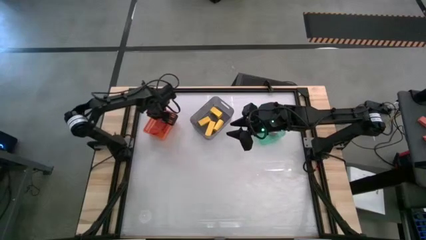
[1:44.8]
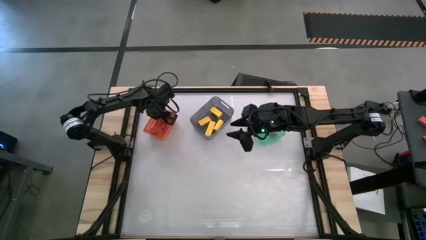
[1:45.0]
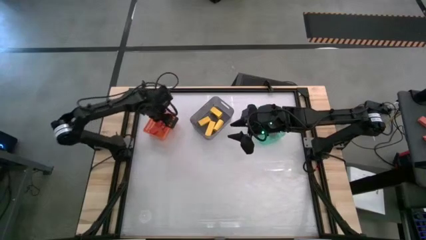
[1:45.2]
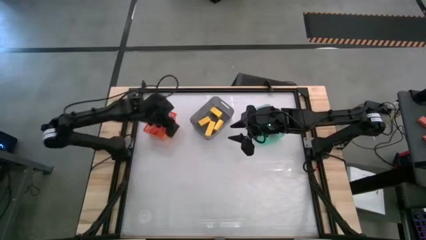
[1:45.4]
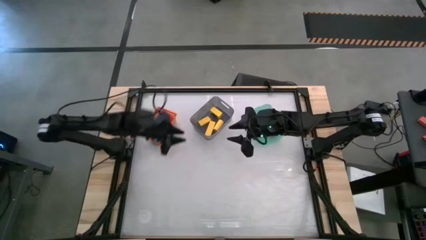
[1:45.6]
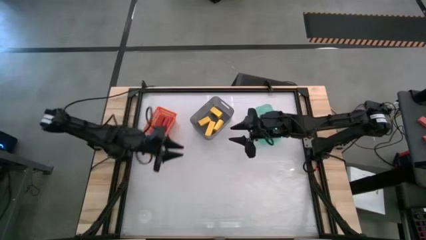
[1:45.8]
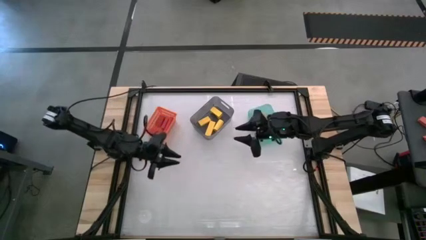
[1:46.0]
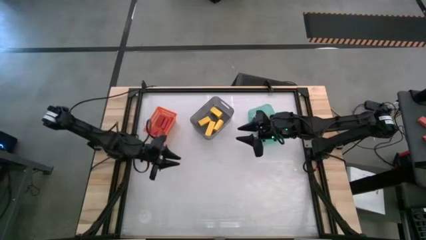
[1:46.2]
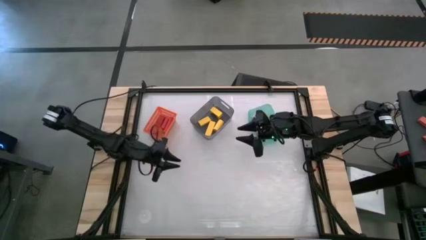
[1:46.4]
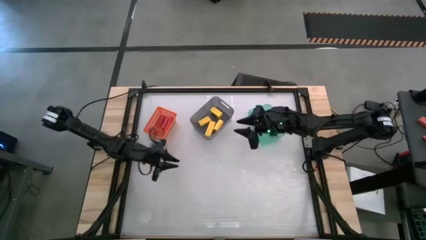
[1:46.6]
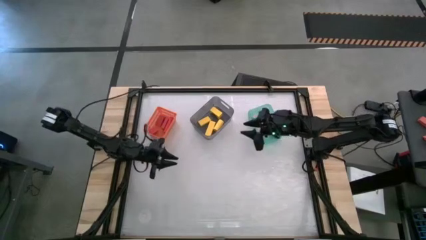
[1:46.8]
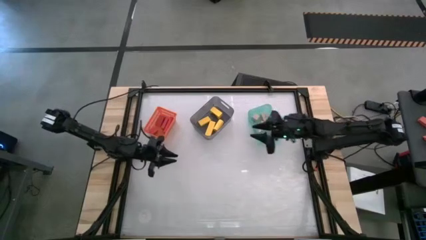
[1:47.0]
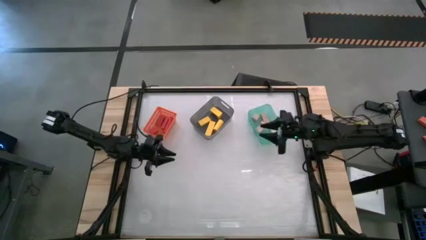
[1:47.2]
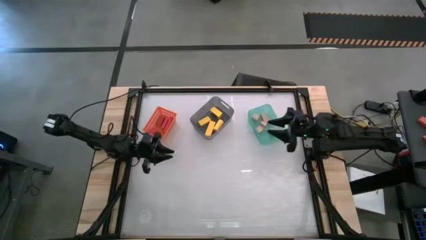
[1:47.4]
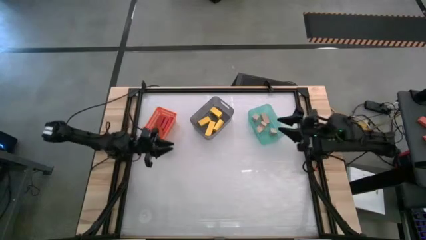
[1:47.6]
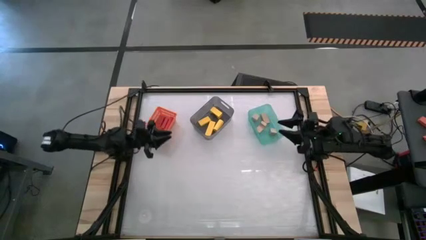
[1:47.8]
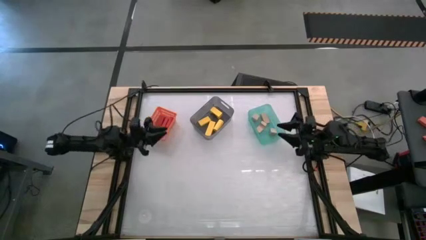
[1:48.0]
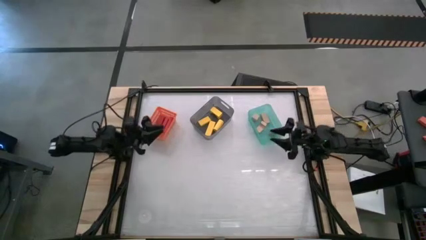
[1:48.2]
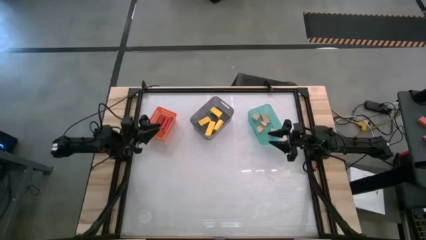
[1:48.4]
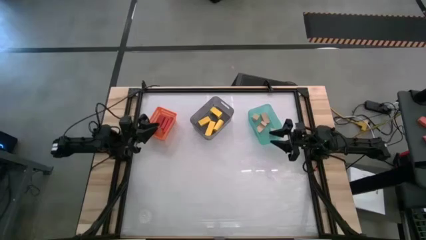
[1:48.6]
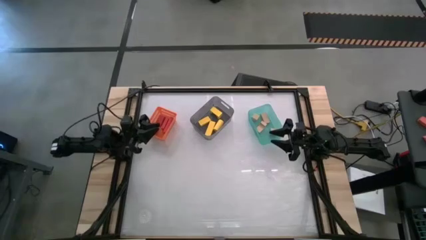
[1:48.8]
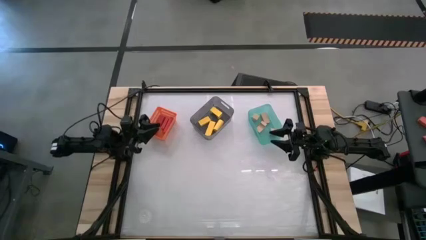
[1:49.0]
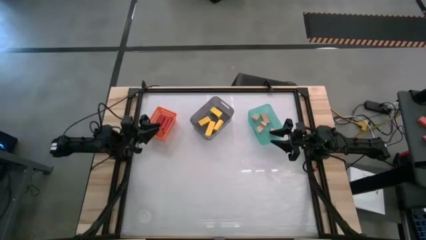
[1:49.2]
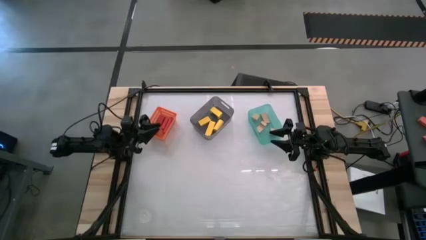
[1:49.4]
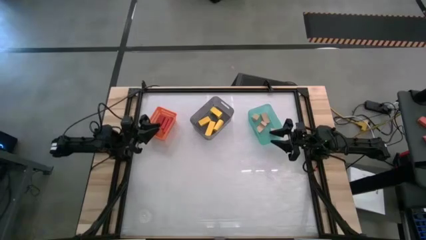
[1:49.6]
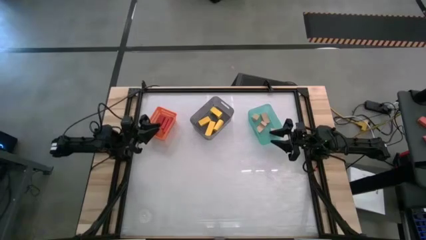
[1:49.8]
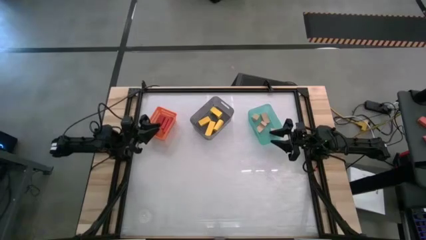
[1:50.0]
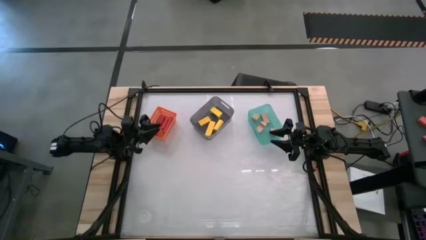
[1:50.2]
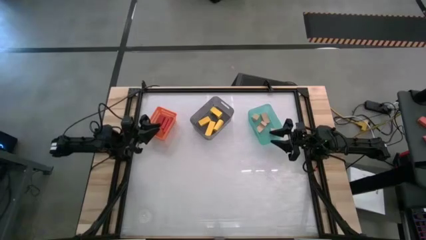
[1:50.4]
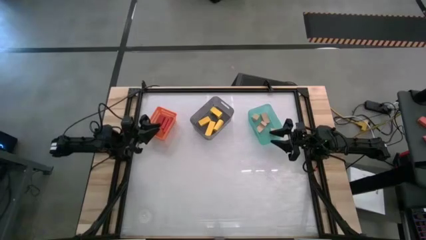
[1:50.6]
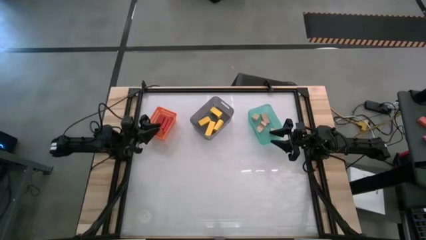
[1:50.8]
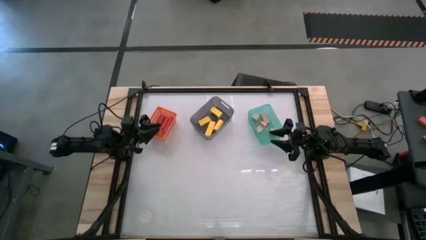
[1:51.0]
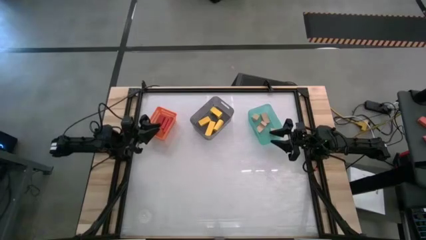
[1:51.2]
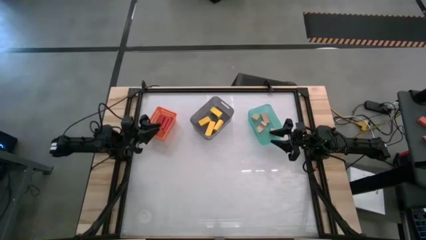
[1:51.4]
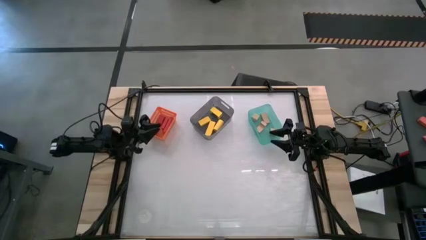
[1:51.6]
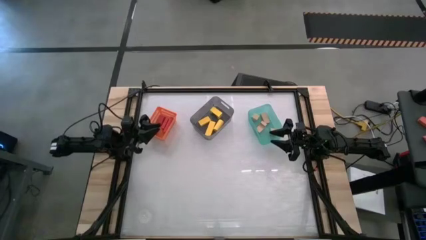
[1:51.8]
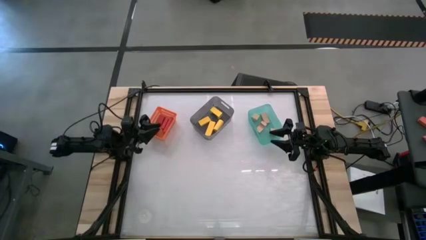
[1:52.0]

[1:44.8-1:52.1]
Task: Sort & place blocks by color
Return to Home Position

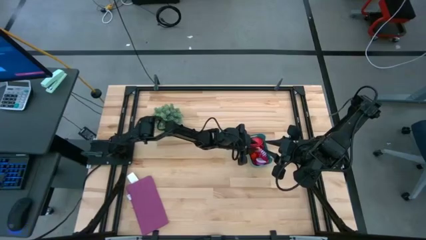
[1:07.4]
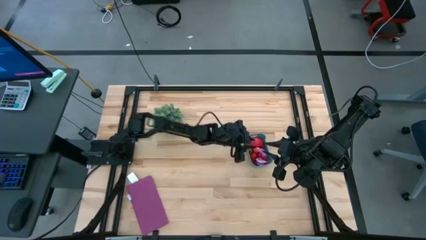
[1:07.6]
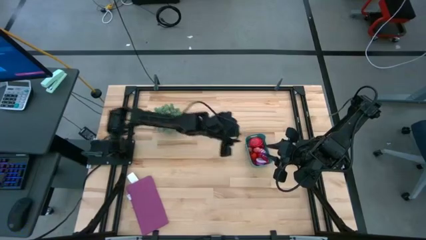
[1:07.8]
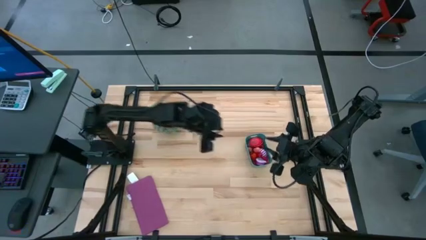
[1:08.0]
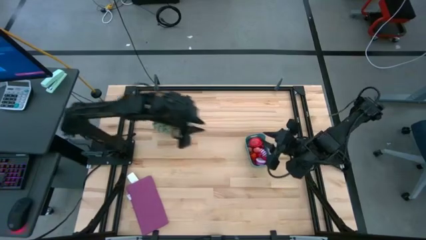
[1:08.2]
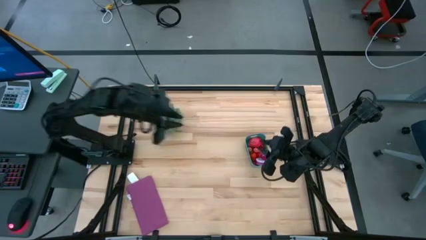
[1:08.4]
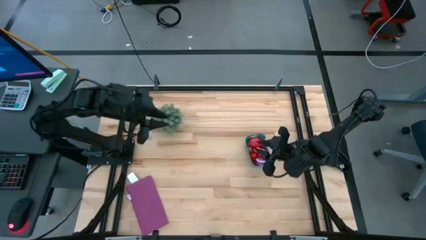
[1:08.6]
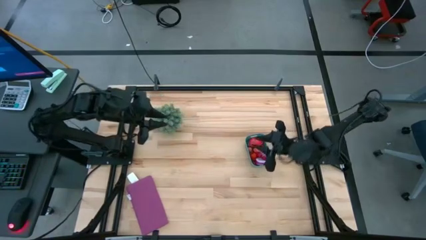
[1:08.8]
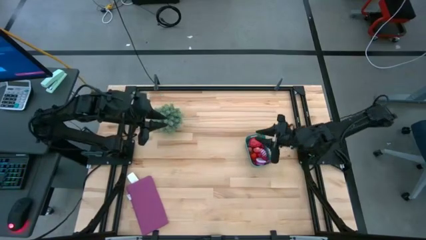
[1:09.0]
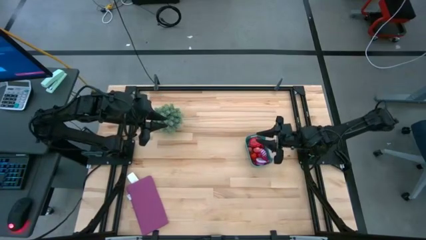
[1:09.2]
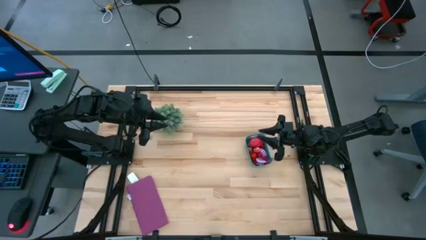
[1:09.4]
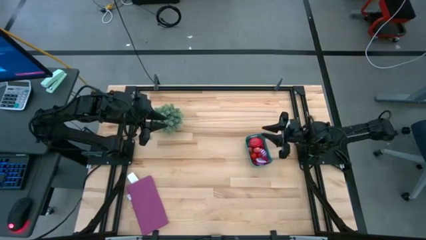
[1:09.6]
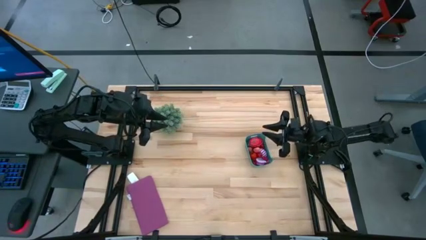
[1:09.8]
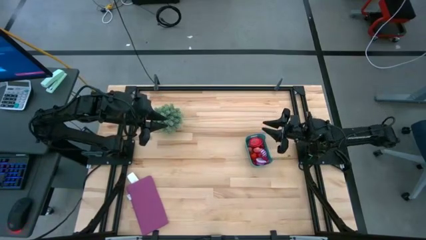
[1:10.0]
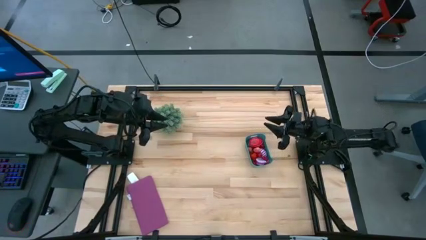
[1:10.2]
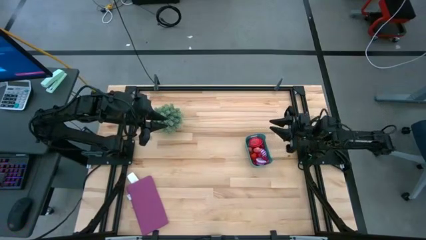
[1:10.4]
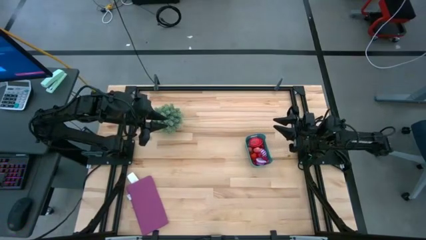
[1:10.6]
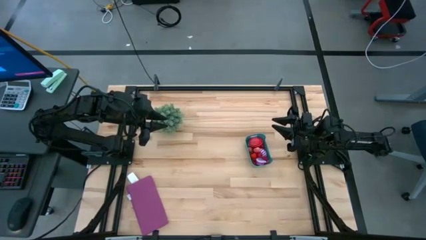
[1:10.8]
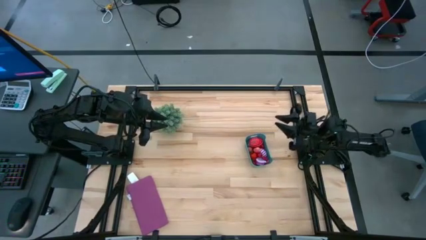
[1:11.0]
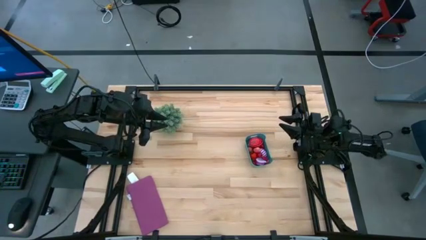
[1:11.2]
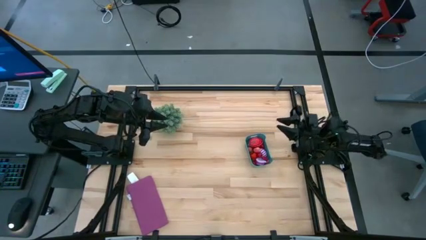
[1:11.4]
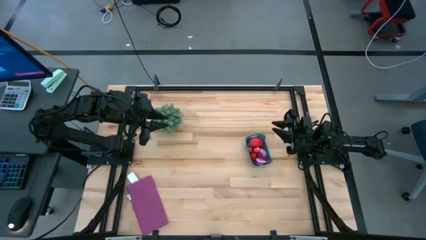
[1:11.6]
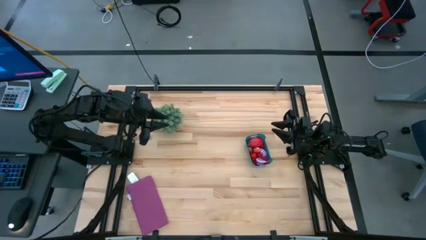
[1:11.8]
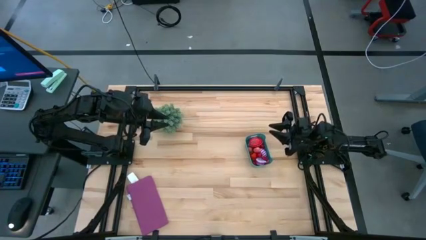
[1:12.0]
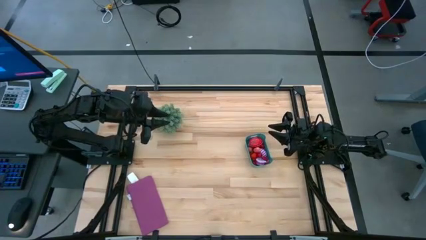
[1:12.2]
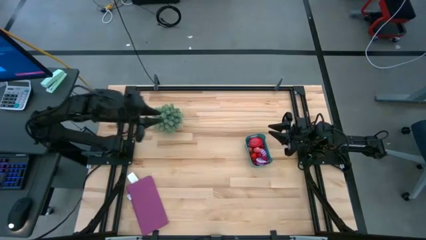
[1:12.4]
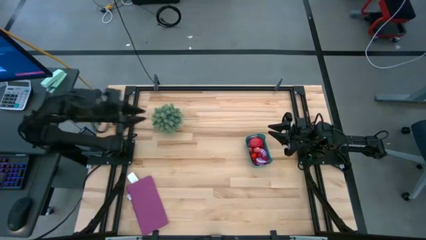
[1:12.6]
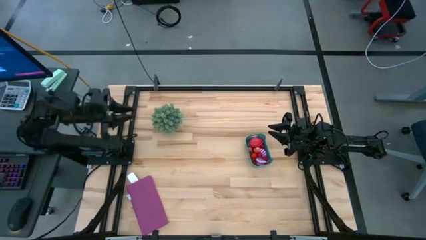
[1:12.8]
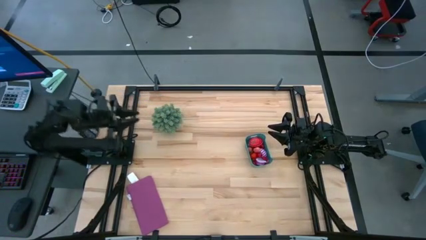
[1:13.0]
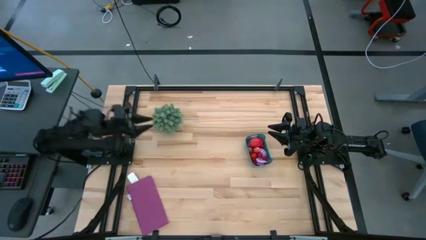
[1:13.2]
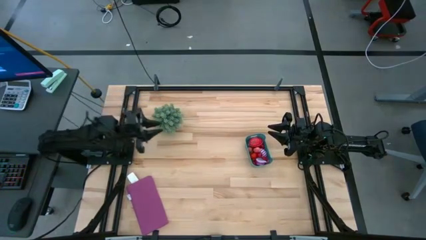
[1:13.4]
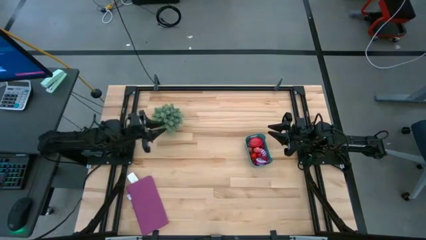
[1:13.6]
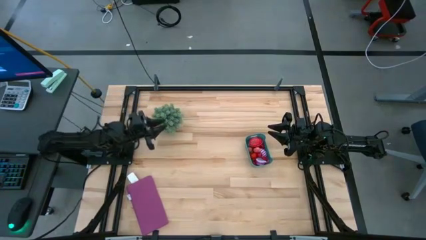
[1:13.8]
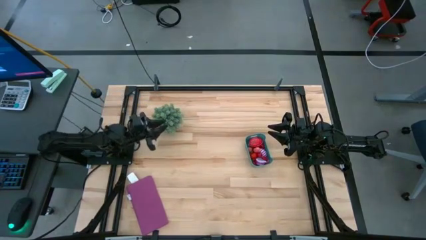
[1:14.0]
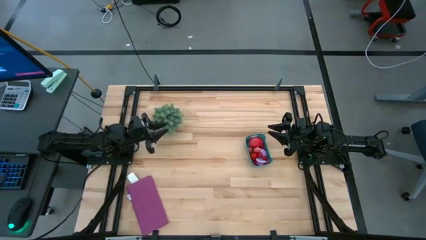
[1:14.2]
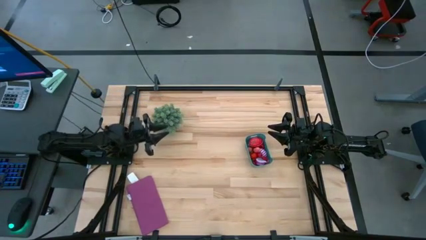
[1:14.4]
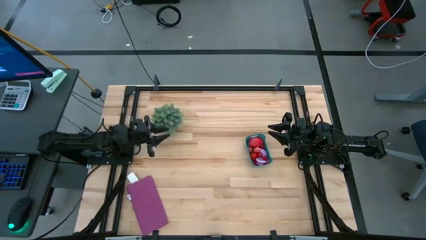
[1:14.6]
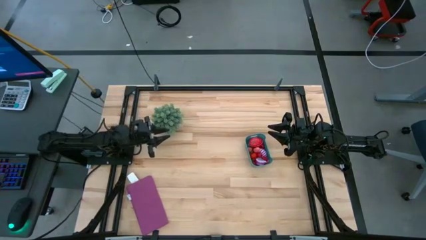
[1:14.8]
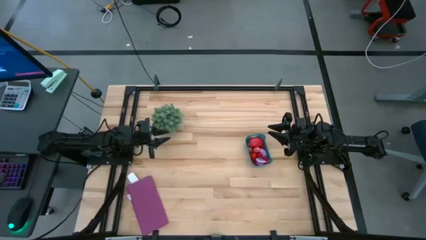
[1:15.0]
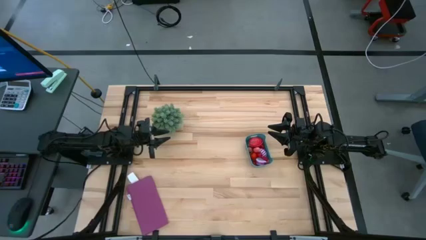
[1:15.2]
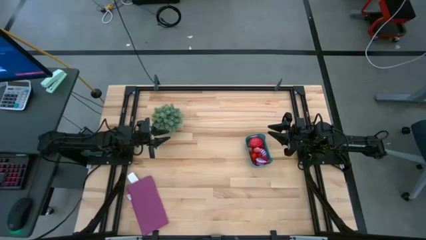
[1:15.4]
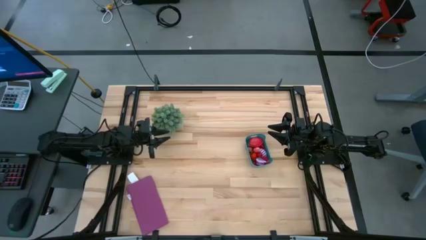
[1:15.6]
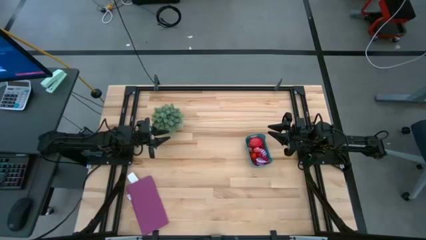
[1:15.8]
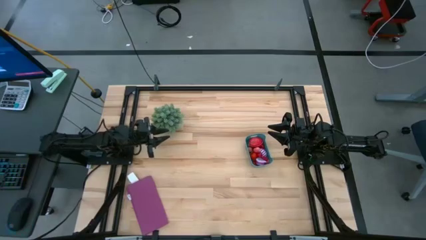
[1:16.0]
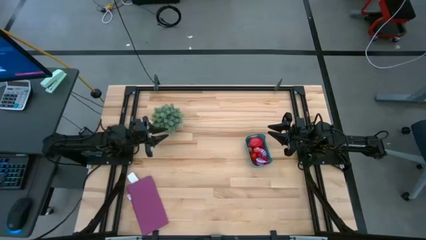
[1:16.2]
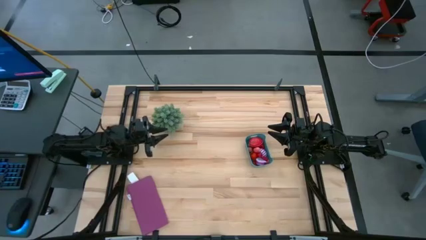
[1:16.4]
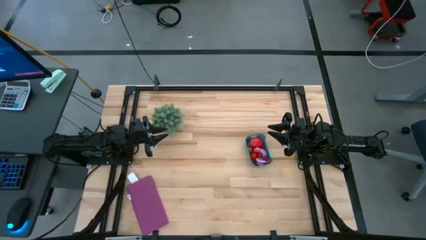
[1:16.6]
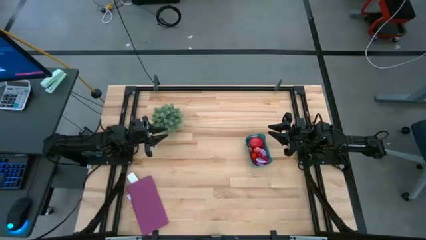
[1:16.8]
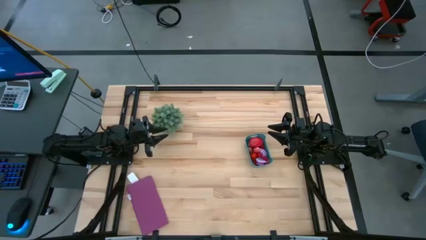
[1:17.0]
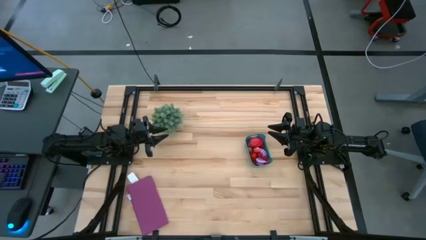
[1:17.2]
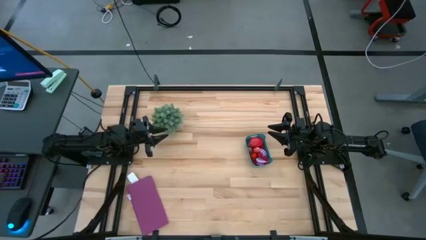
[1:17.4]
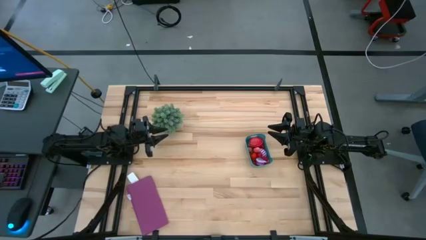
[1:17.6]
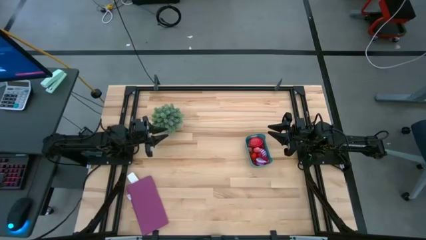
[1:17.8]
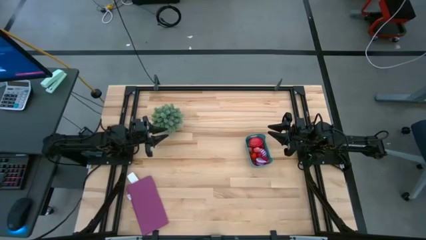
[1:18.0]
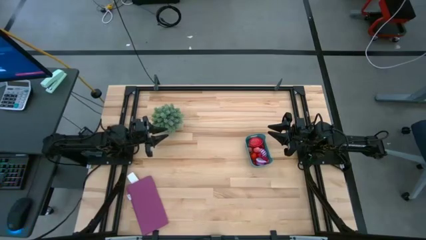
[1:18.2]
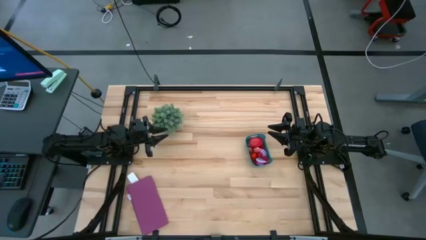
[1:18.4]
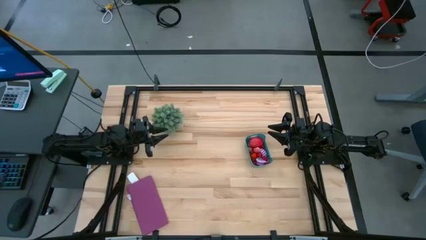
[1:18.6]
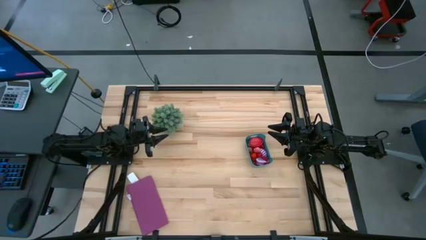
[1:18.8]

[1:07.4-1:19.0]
Task: Pick and placing Produce into tupperware
Return to Home Position
